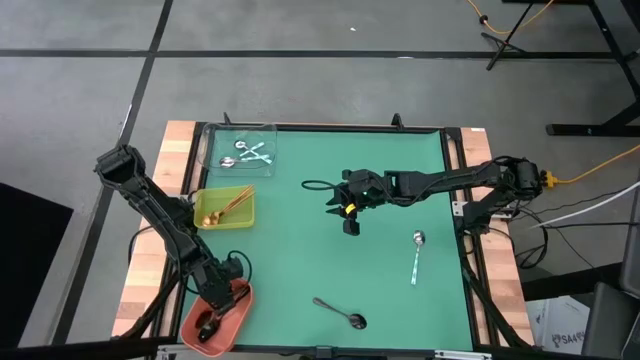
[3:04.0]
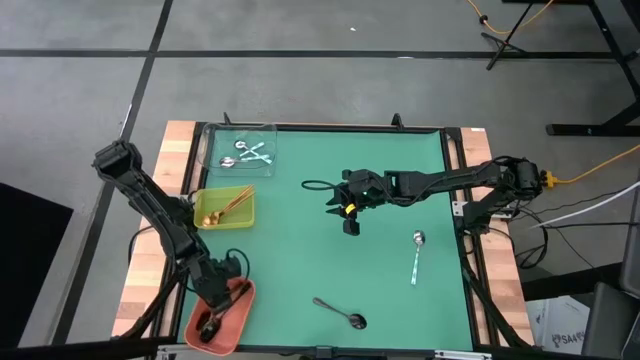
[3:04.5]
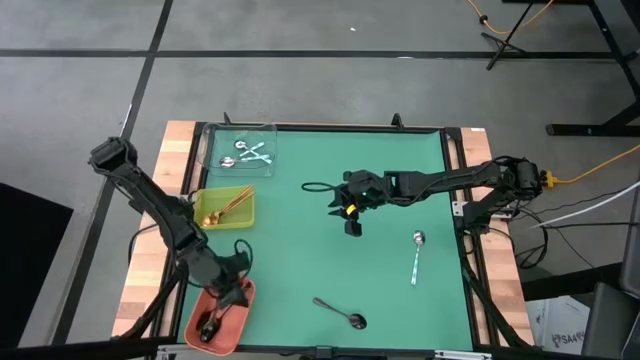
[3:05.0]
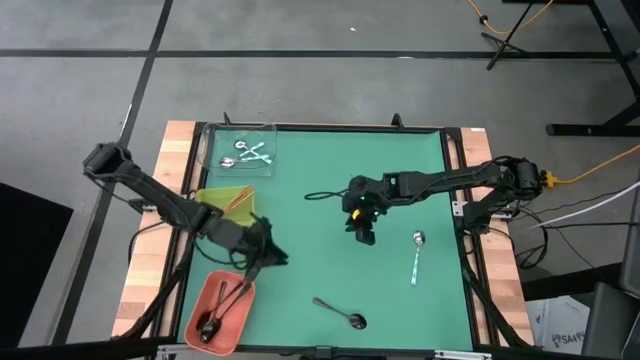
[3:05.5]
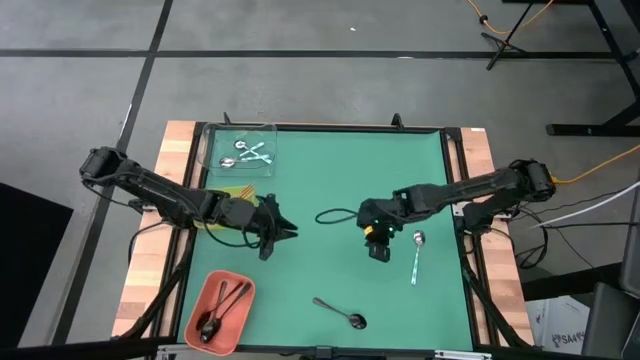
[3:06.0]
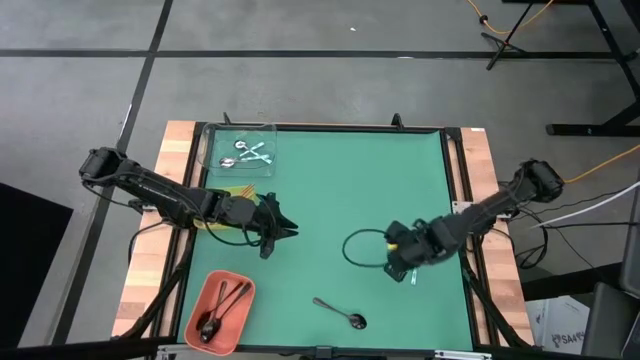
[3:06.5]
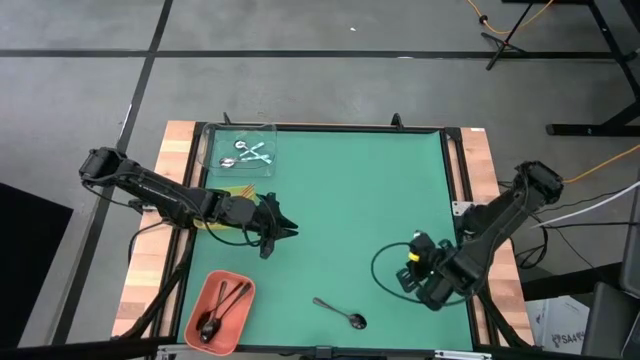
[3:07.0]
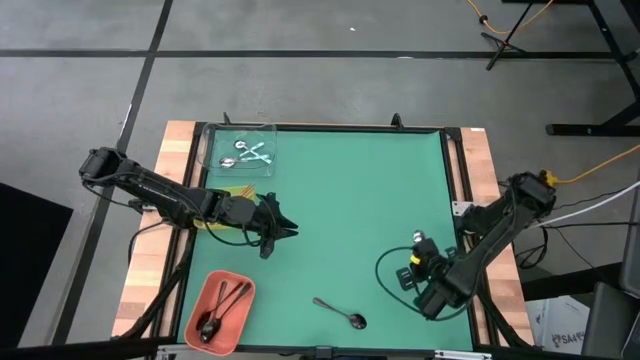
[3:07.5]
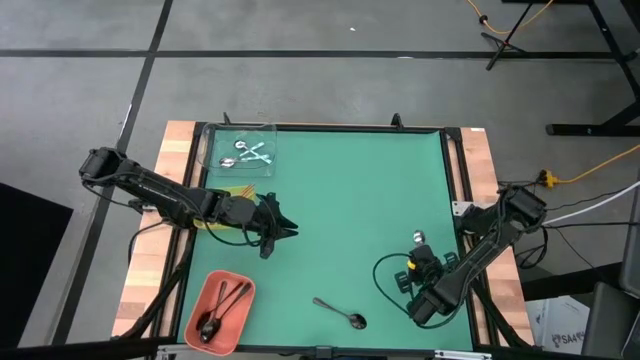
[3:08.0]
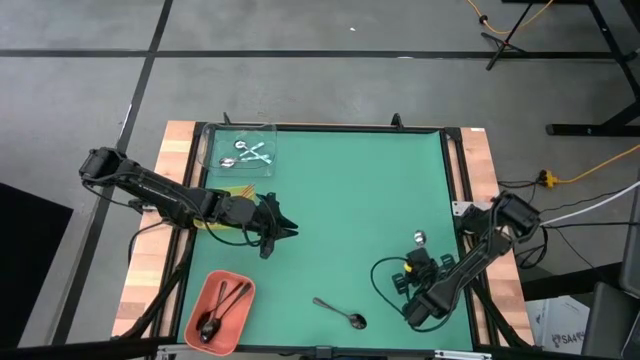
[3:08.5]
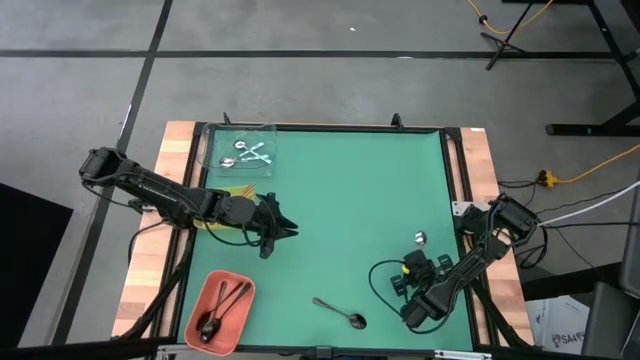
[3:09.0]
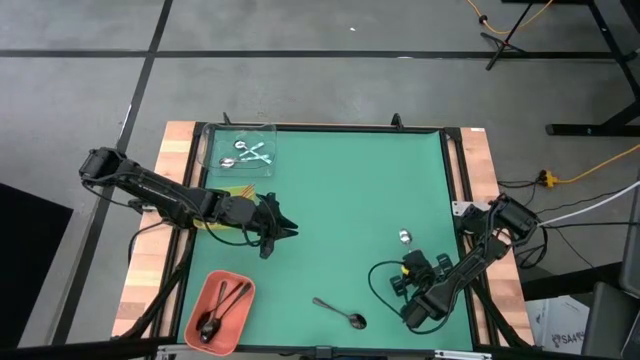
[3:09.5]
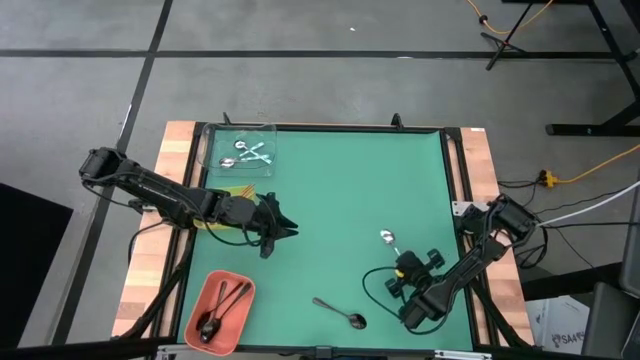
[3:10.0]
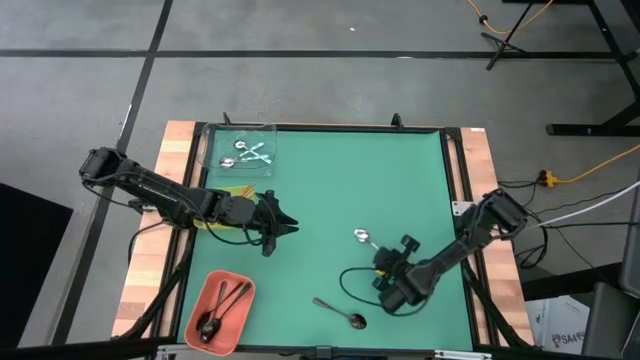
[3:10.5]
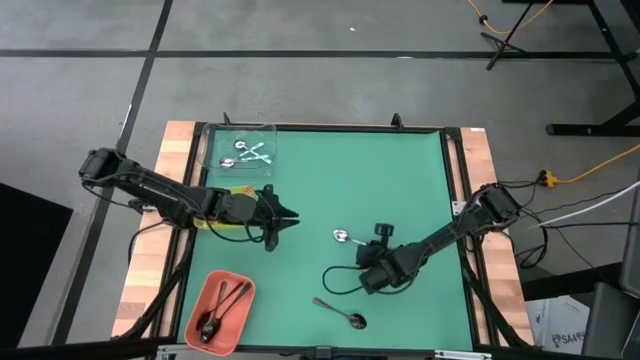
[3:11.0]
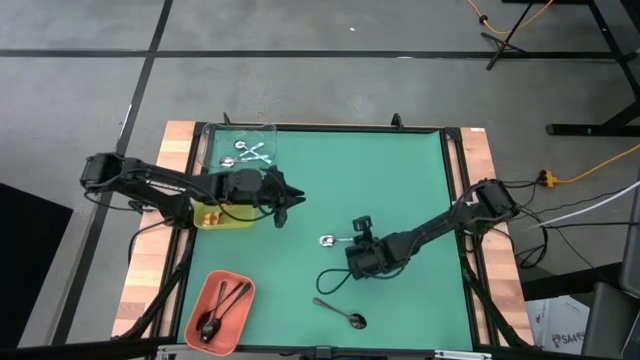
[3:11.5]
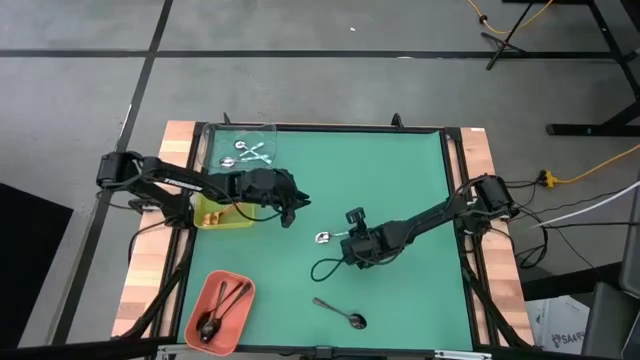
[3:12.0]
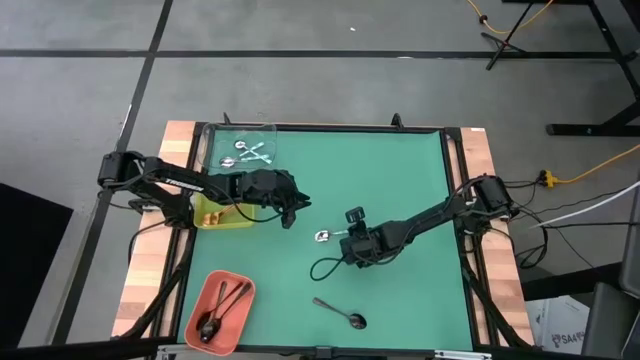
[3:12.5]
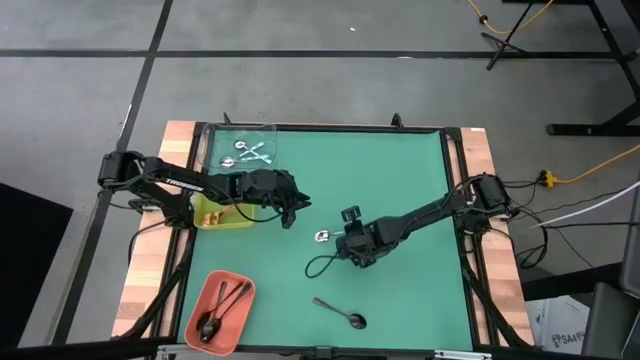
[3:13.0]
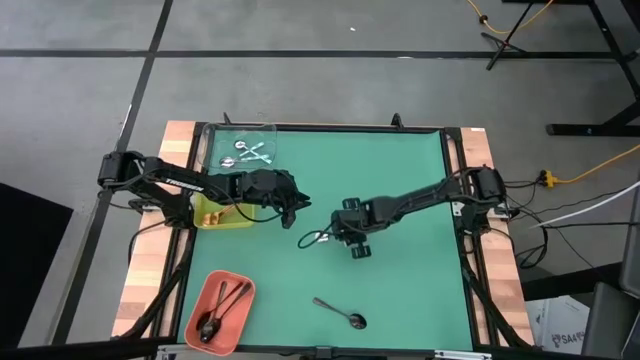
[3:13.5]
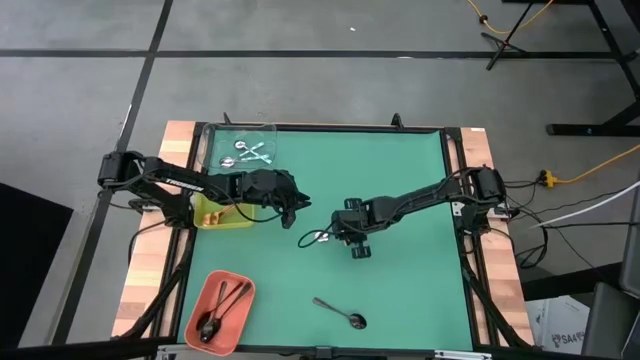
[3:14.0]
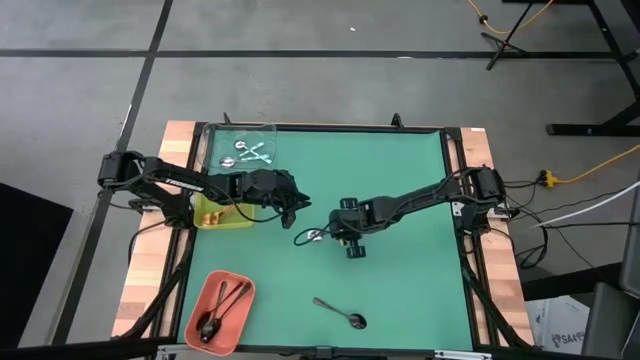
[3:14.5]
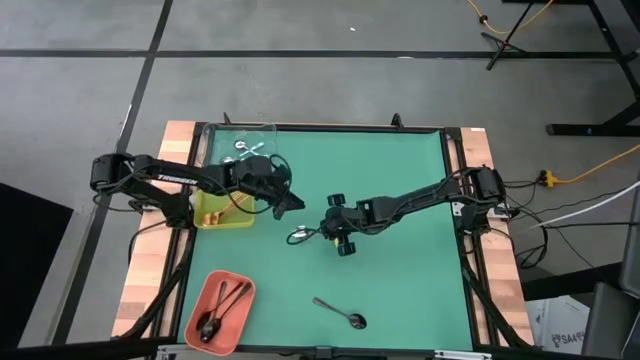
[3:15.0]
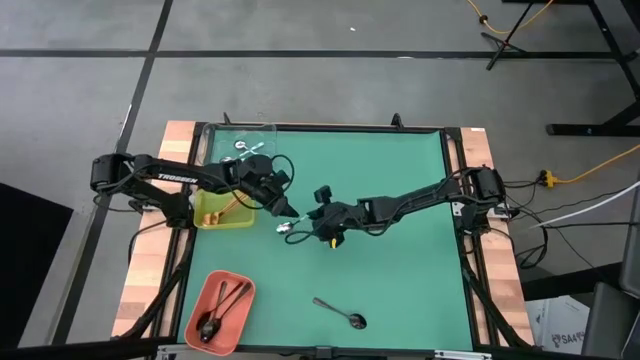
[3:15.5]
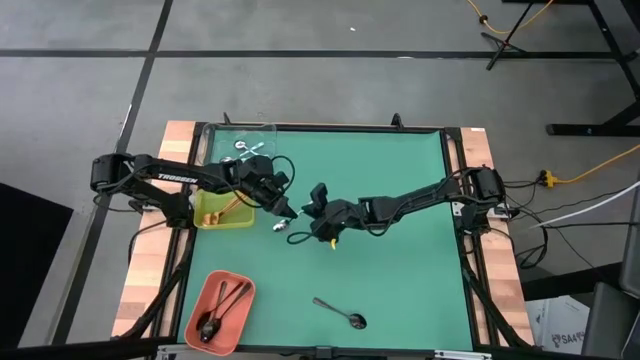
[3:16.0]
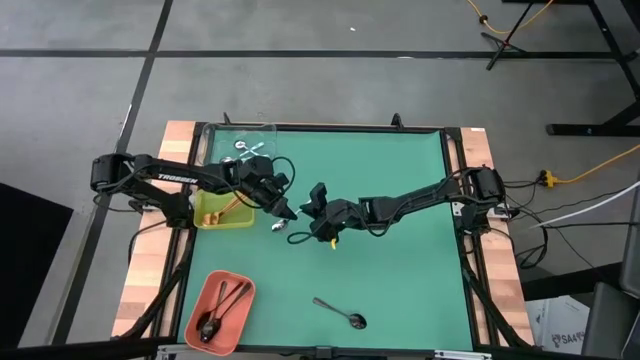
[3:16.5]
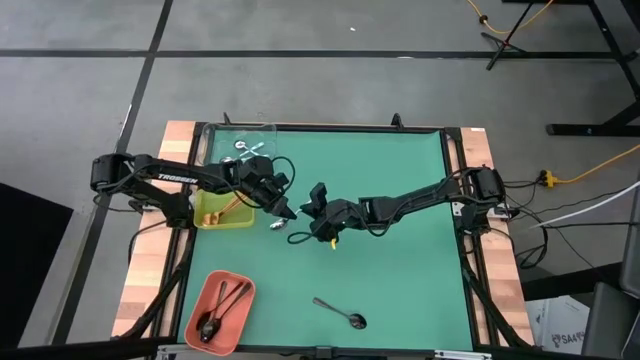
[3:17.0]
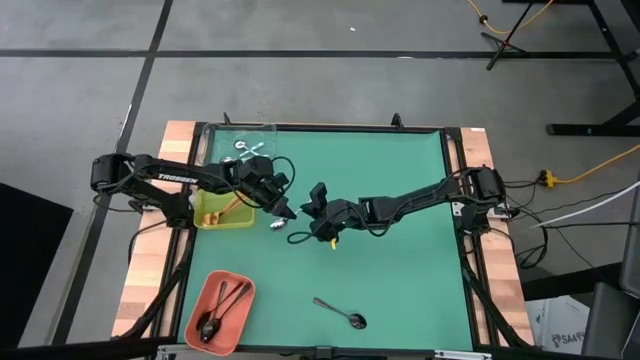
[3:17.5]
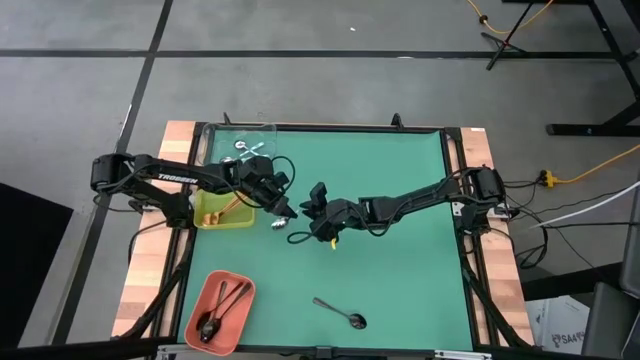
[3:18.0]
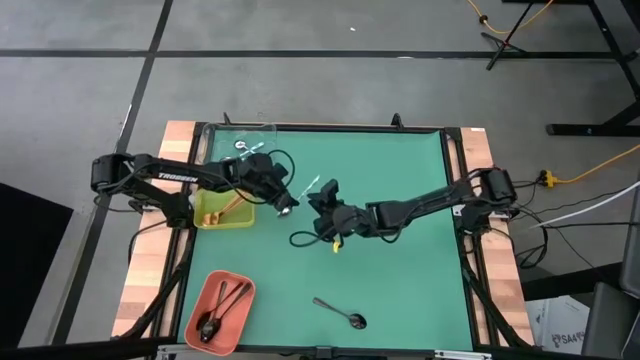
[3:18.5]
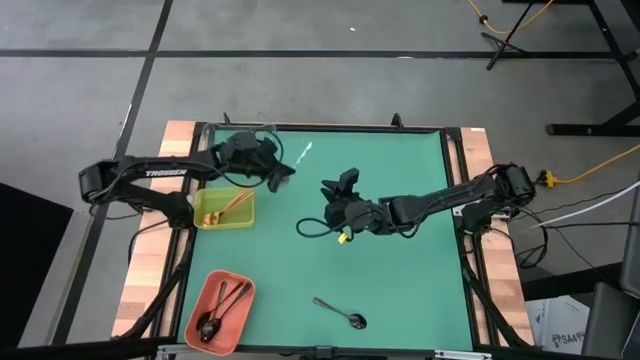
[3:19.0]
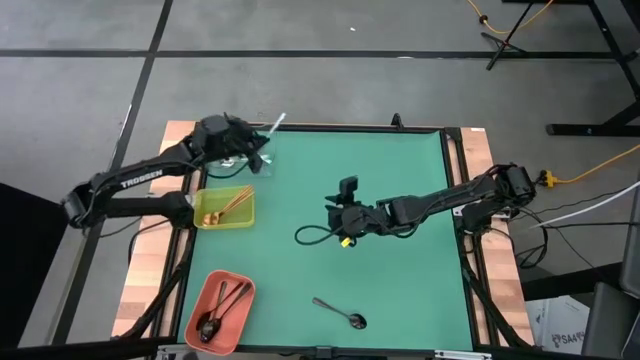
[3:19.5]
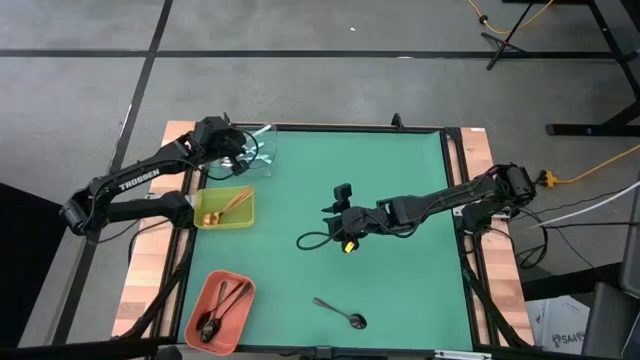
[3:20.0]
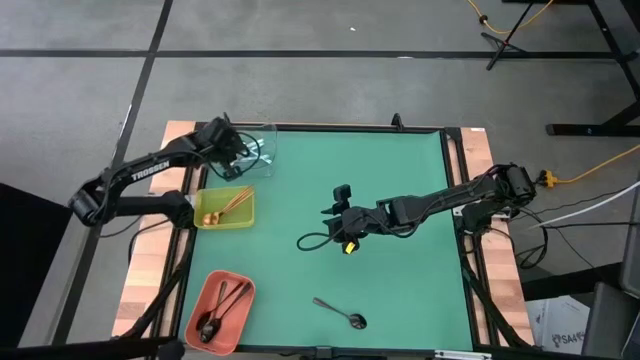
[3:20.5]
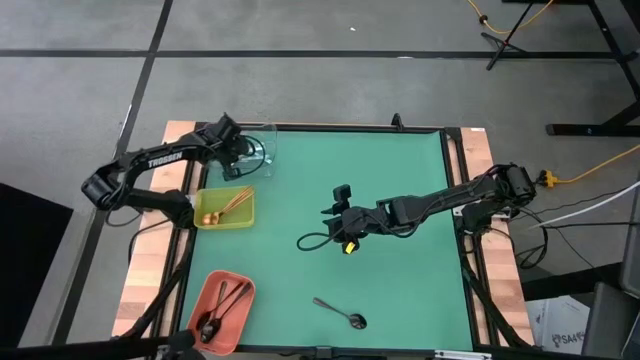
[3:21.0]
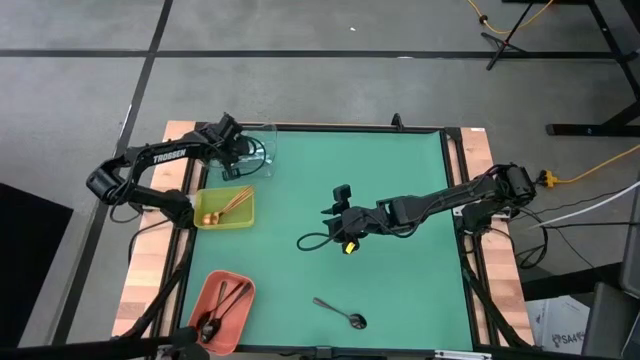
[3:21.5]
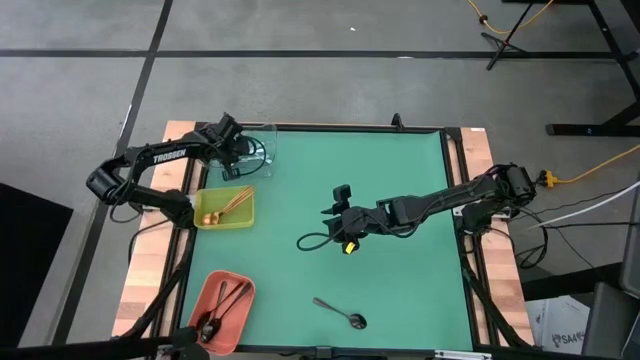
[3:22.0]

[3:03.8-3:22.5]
Task: Sort silverware by color (type)
Put the white spoon into the transparent bin
